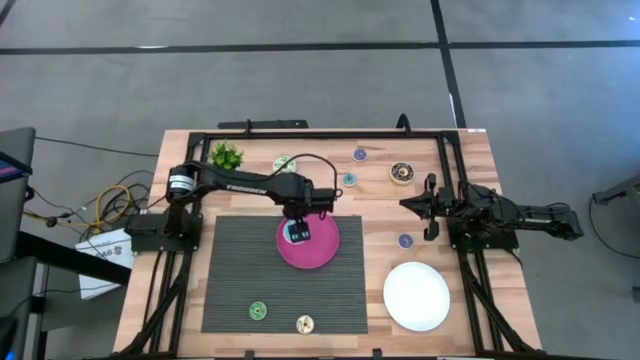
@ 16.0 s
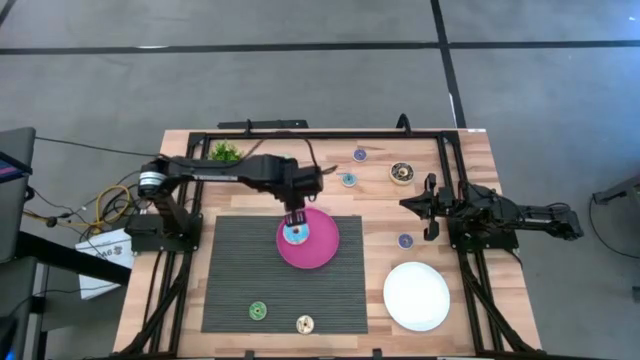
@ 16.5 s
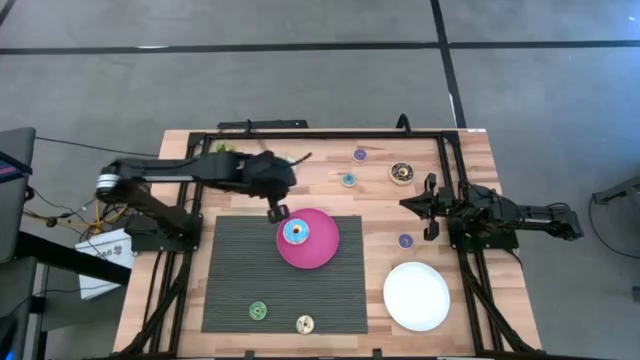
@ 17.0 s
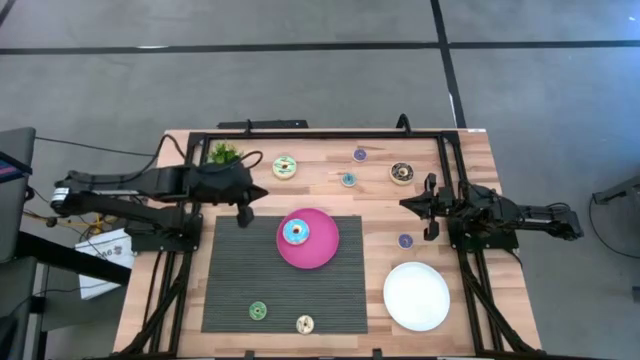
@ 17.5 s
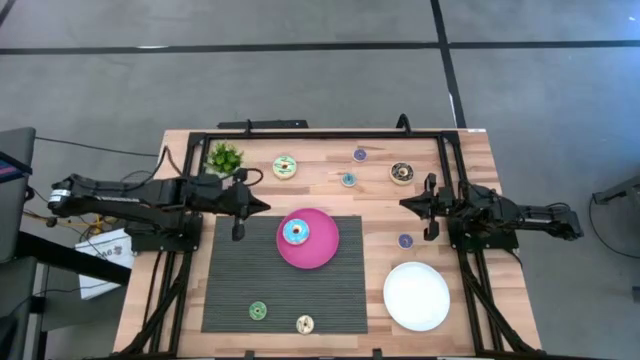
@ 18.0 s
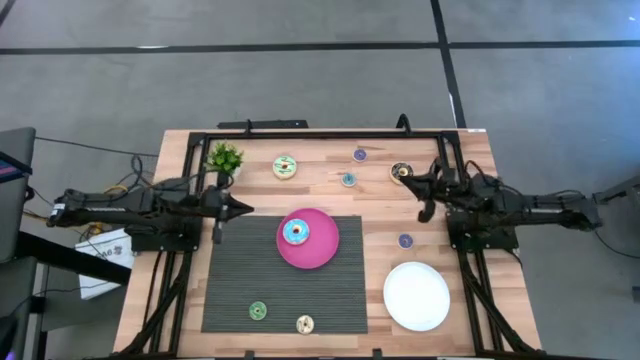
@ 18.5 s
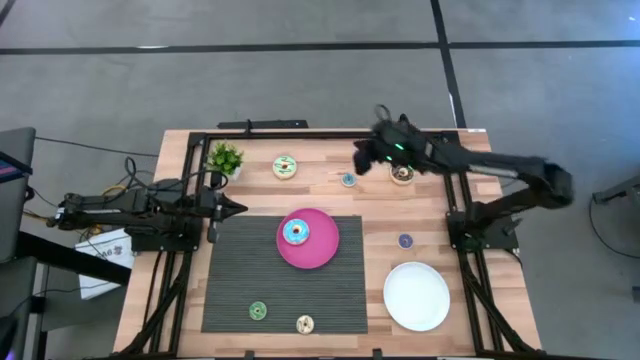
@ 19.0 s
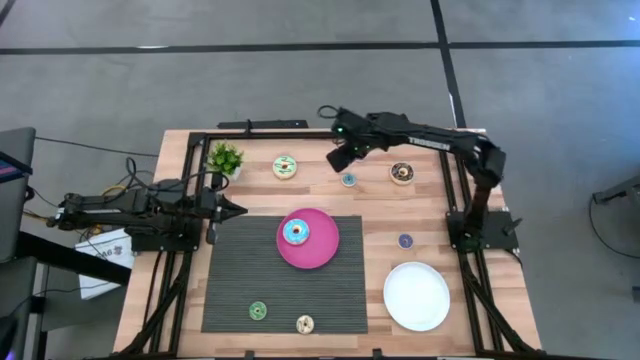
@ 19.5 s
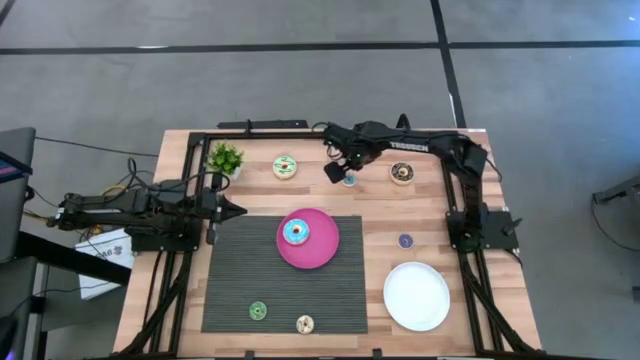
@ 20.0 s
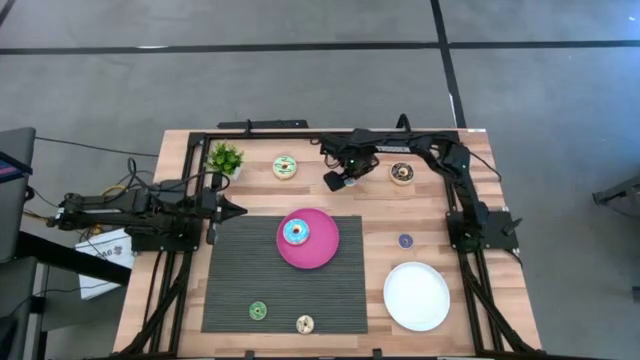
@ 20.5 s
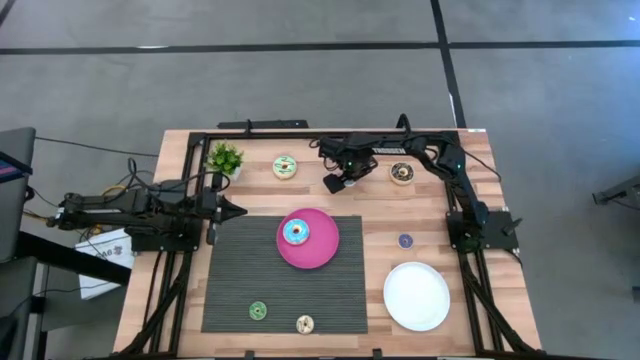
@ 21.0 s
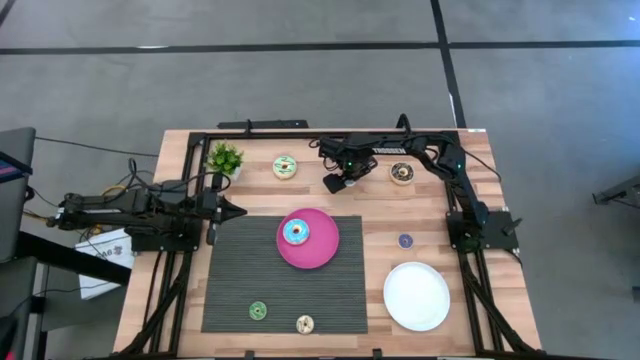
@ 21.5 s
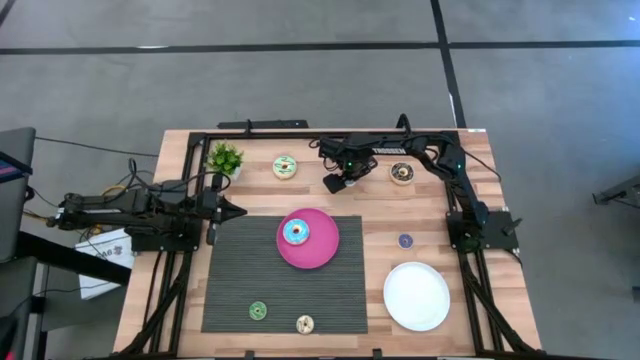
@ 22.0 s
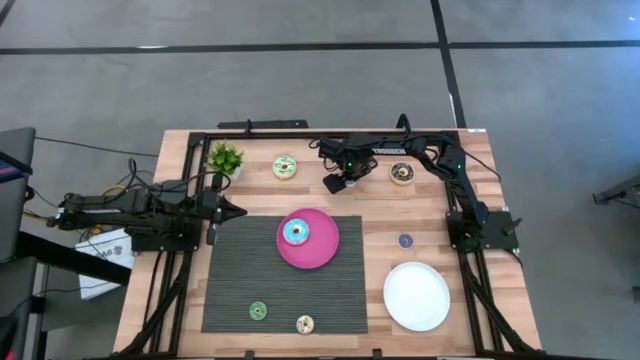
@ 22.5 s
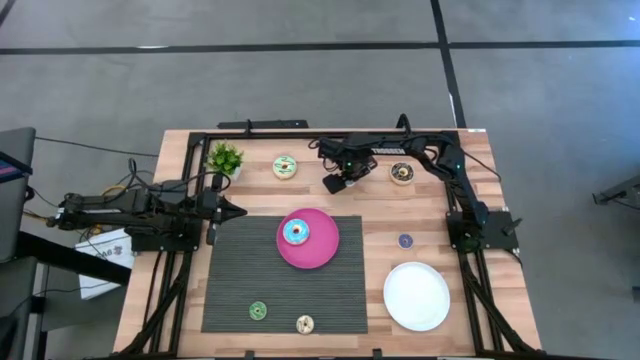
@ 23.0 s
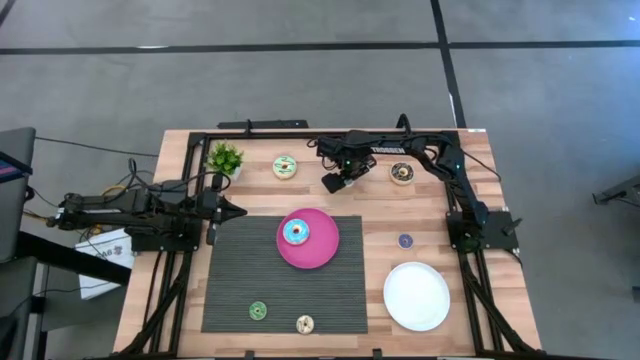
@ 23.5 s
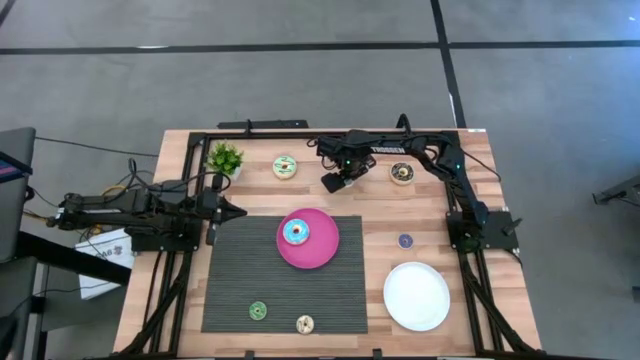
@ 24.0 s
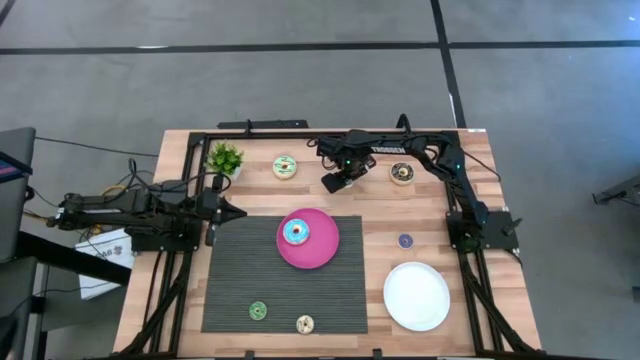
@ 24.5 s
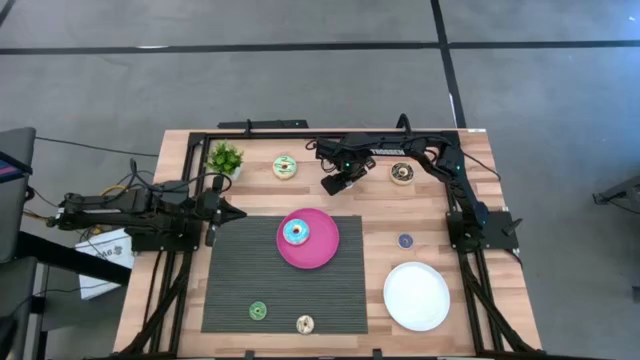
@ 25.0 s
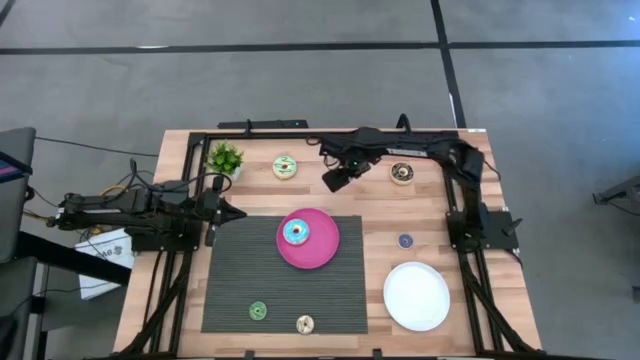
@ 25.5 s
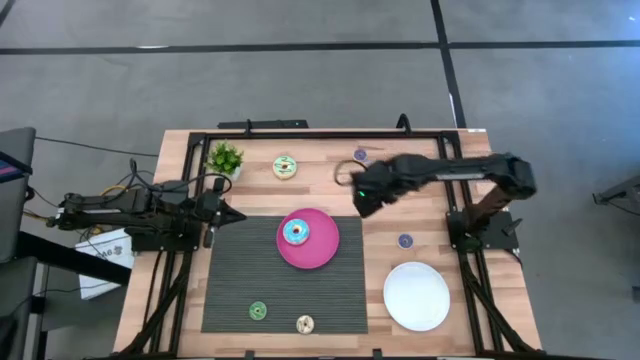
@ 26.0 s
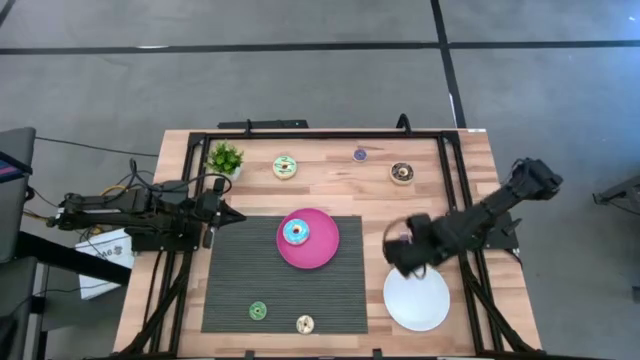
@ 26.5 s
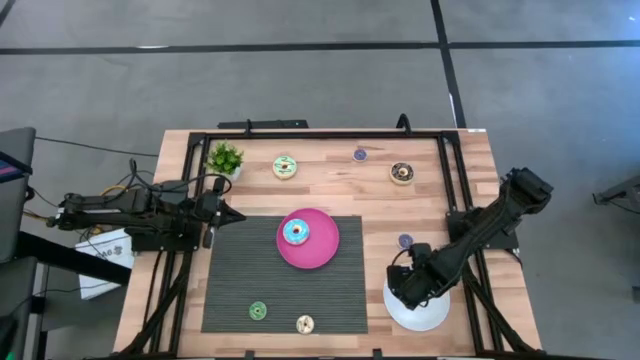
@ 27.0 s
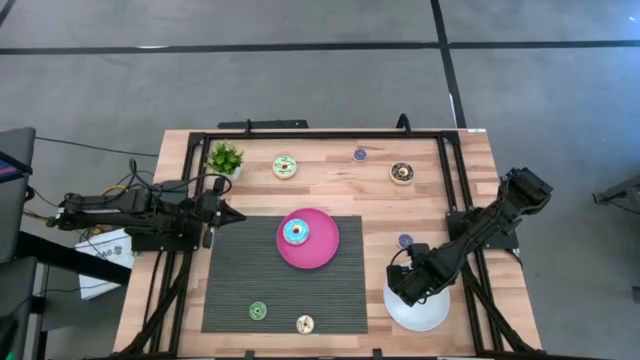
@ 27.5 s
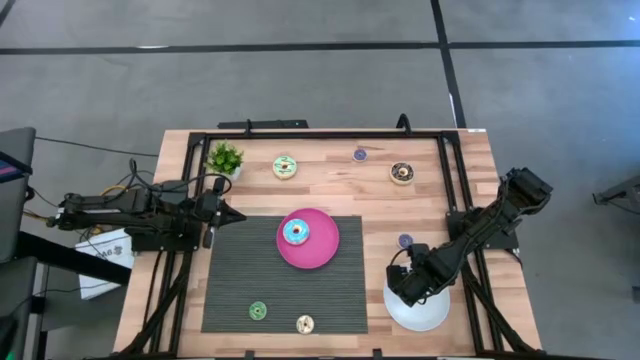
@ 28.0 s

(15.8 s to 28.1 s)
Task: Pick & Place donuts
Put the small blue donut on the white plate

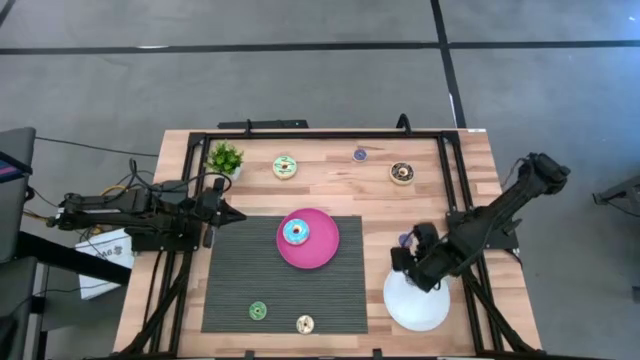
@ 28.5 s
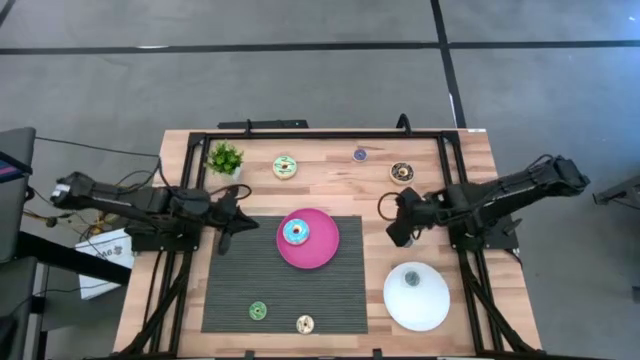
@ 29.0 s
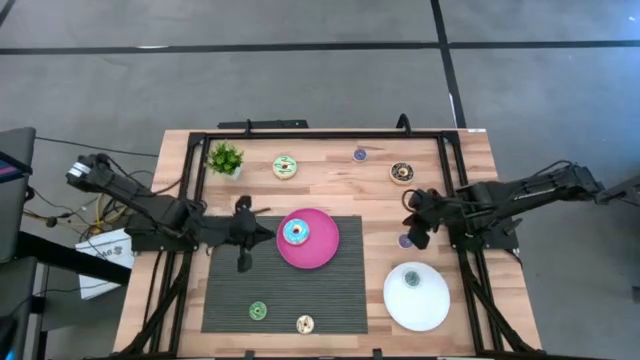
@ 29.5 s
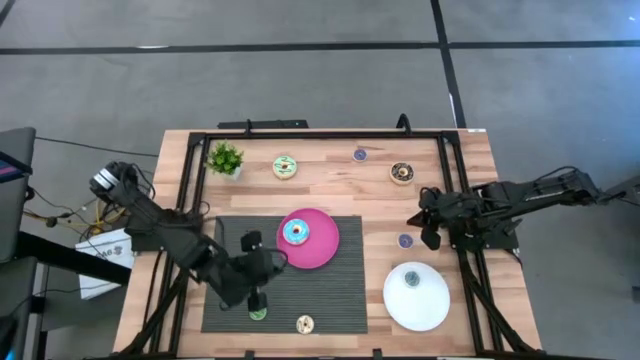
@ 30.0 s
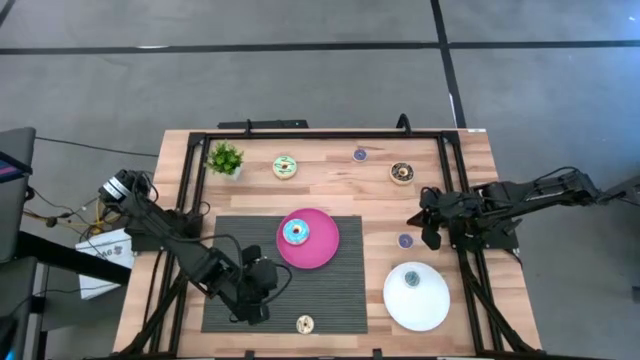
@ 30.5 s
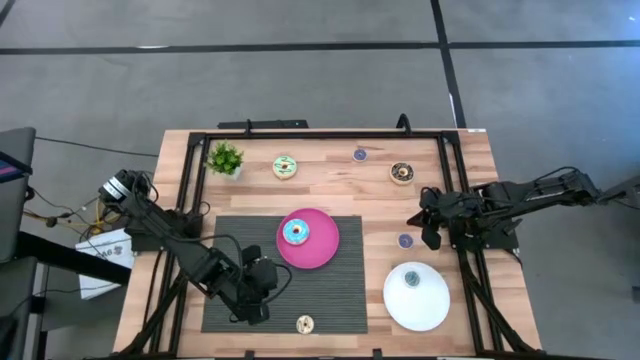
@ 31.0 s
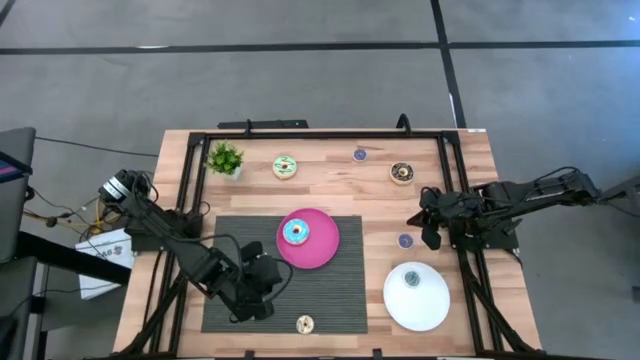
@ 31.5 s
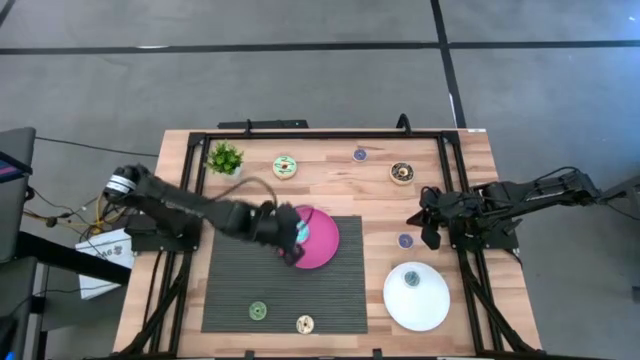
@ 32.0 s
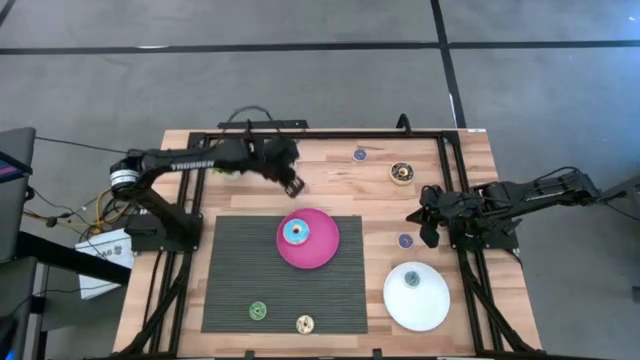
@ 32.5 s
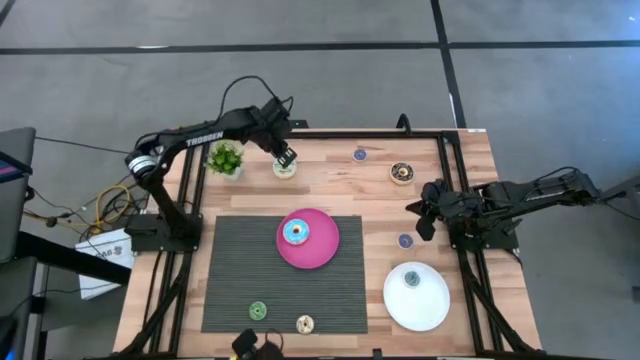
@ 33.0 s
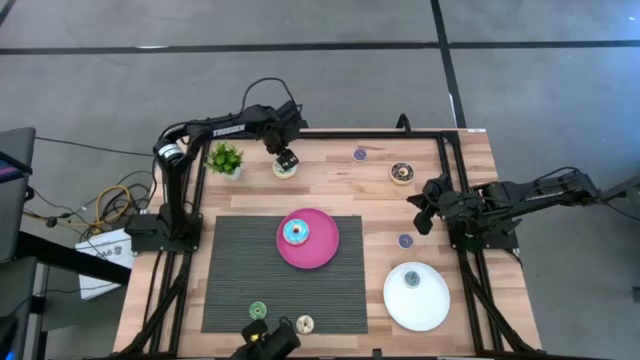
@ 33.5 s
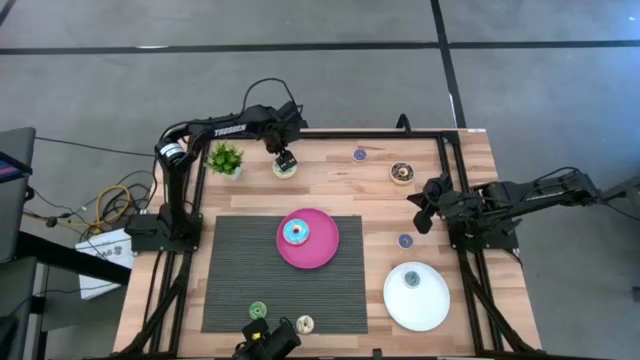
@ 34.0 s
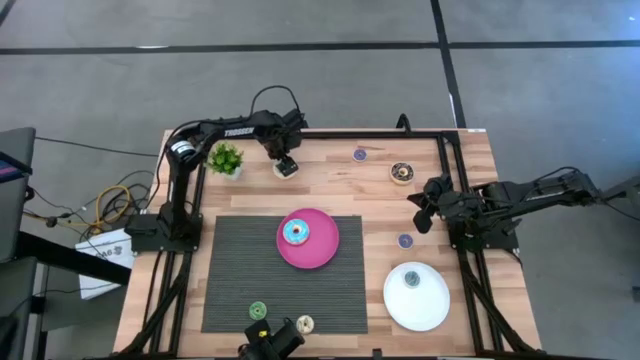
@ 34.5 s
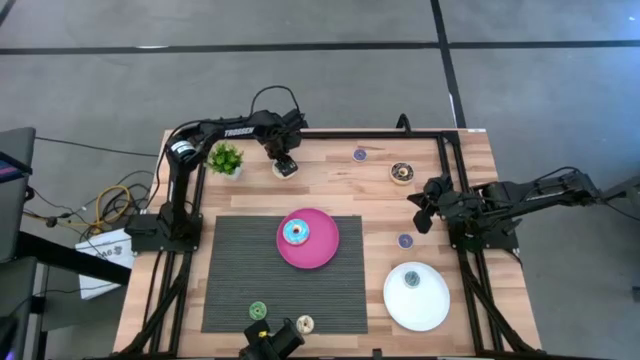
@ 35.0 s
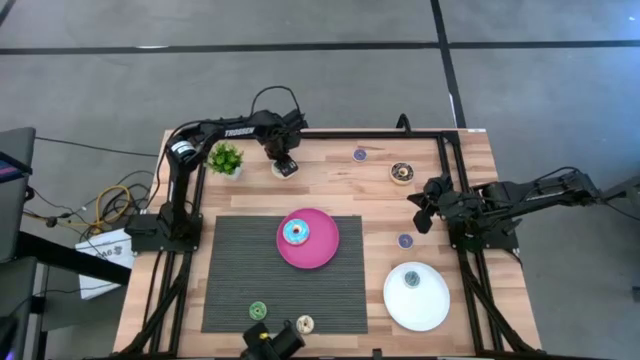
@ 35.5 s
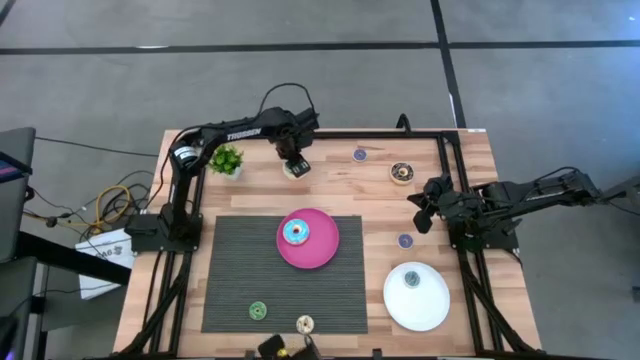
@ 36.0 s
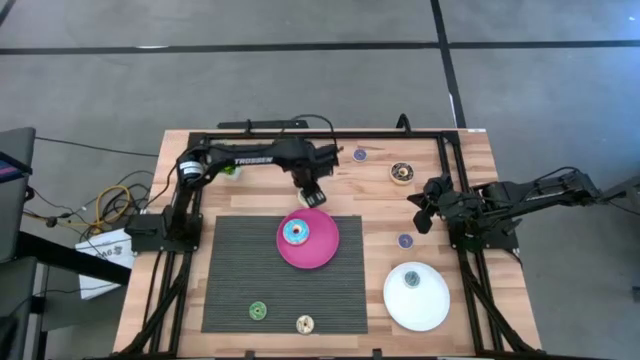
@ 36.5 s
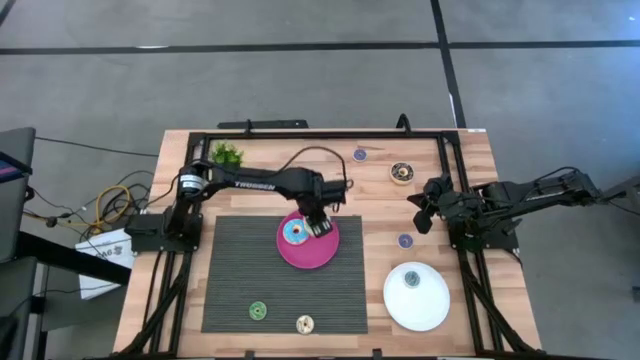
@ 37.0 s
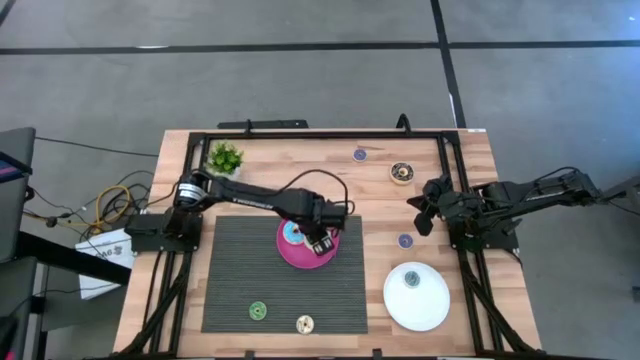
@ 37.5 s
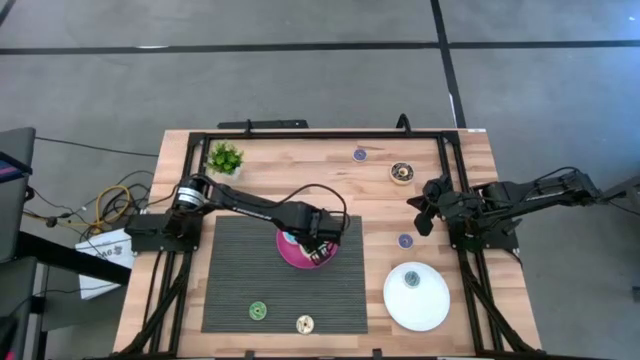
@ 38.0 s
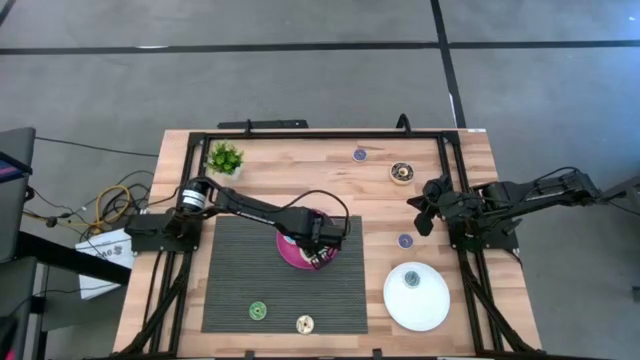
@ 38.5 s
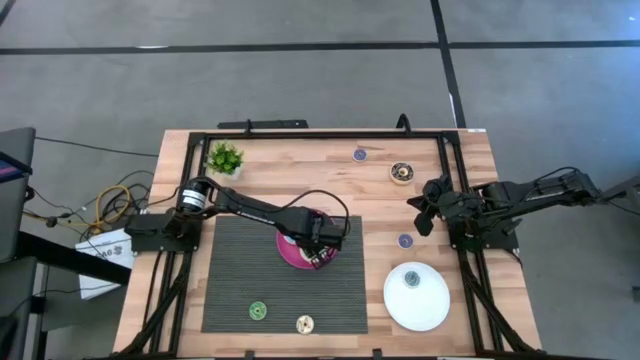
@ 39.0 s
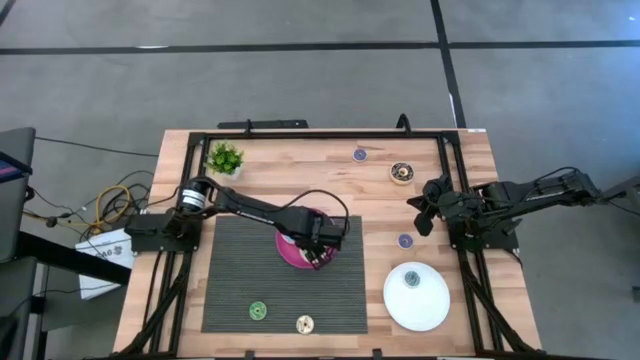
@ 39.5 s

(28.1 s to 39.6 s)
Put the large light green donut on the pink plate
